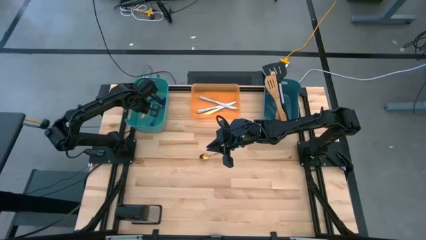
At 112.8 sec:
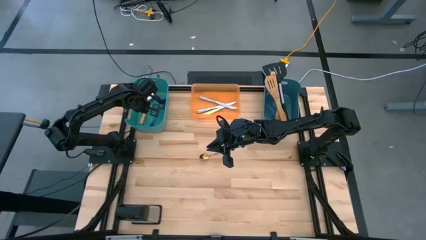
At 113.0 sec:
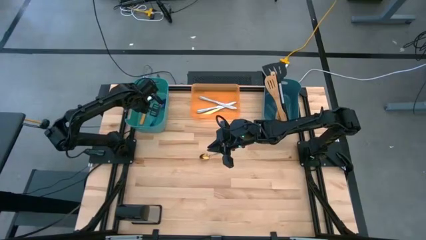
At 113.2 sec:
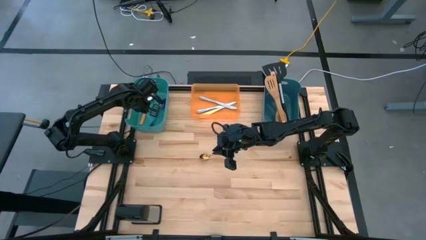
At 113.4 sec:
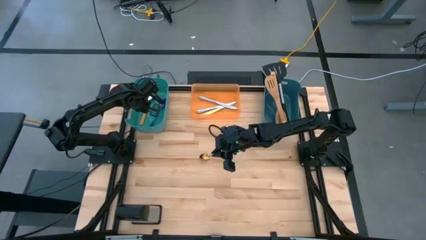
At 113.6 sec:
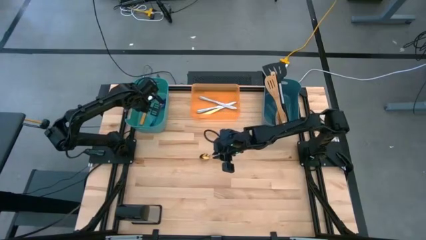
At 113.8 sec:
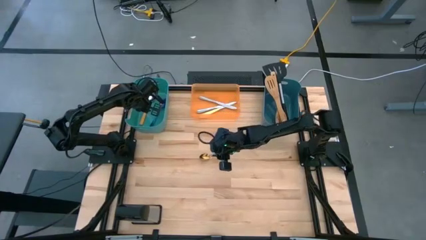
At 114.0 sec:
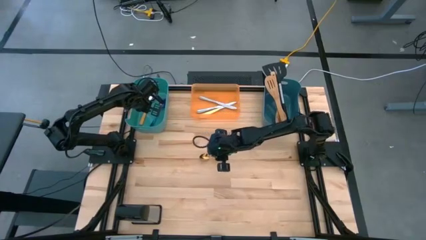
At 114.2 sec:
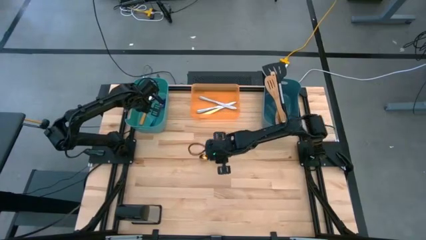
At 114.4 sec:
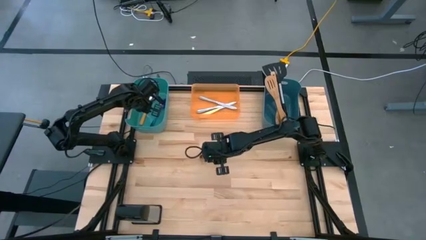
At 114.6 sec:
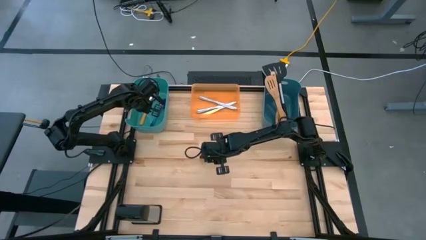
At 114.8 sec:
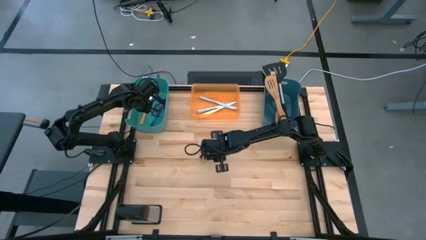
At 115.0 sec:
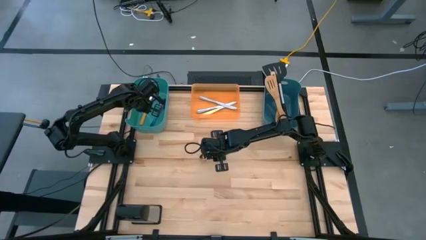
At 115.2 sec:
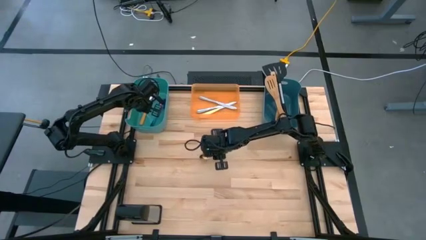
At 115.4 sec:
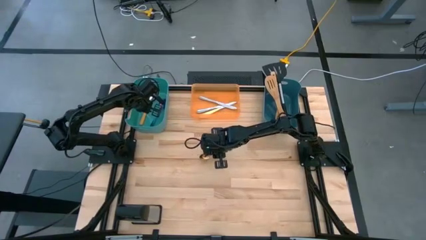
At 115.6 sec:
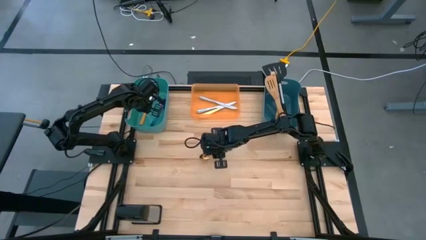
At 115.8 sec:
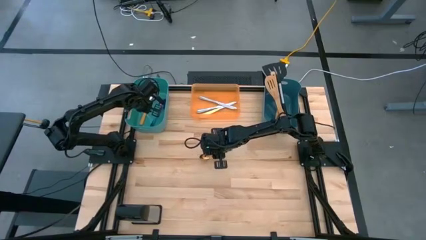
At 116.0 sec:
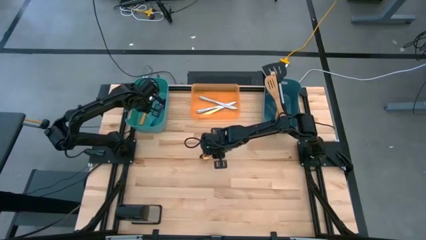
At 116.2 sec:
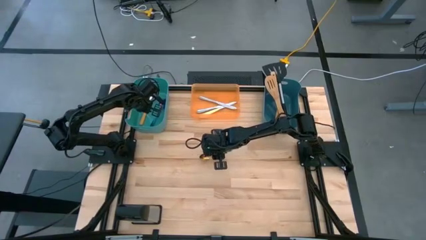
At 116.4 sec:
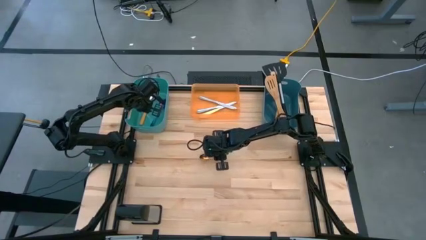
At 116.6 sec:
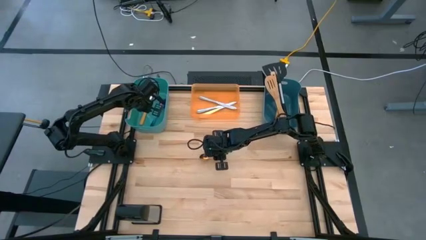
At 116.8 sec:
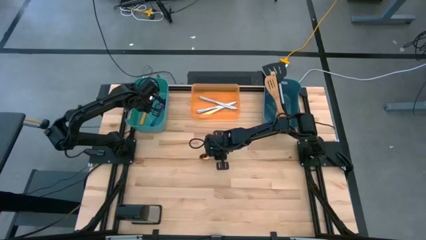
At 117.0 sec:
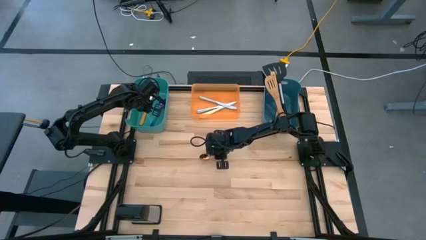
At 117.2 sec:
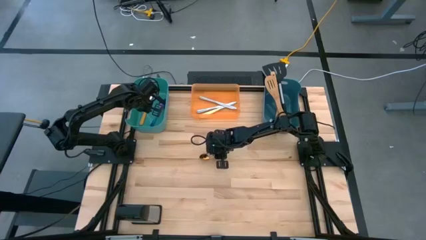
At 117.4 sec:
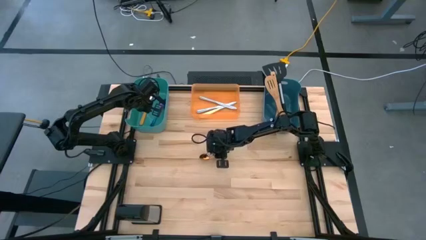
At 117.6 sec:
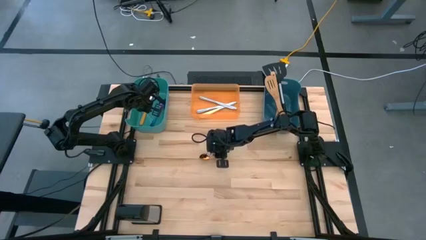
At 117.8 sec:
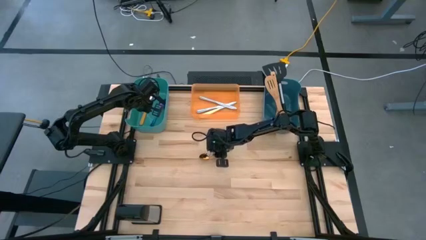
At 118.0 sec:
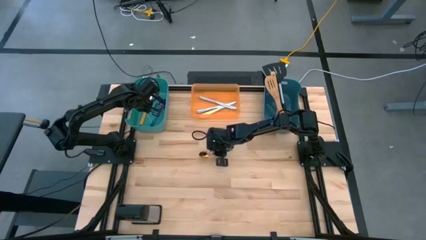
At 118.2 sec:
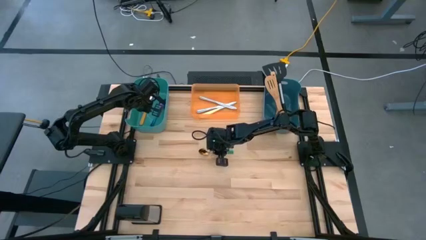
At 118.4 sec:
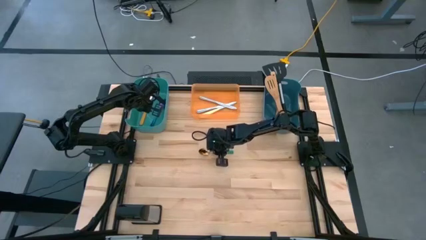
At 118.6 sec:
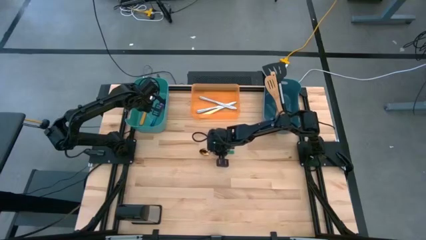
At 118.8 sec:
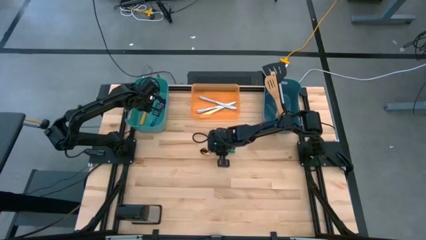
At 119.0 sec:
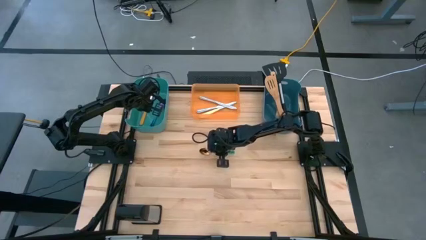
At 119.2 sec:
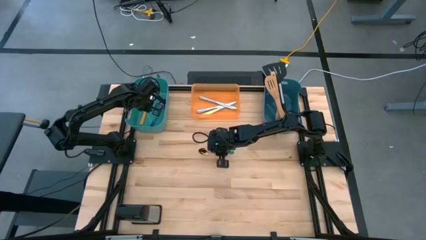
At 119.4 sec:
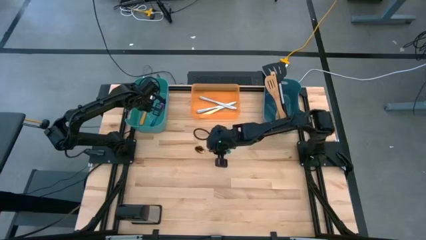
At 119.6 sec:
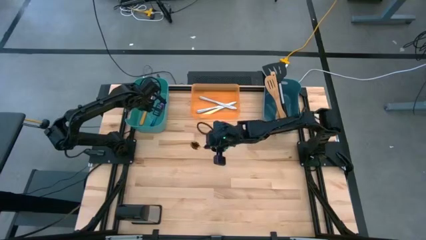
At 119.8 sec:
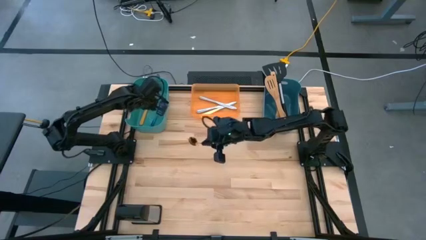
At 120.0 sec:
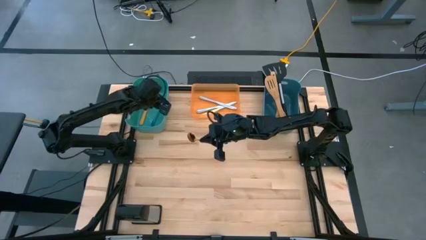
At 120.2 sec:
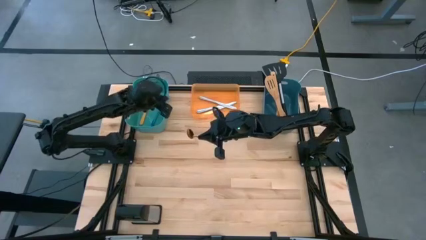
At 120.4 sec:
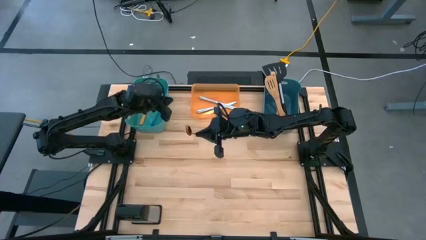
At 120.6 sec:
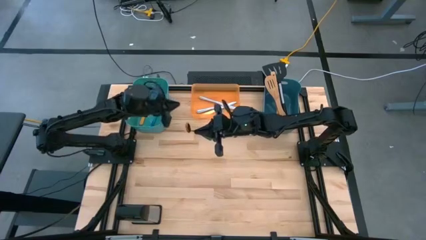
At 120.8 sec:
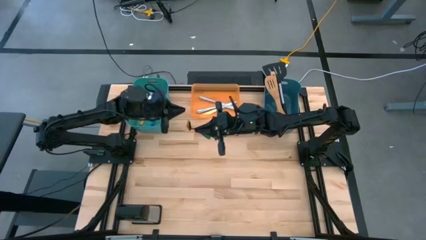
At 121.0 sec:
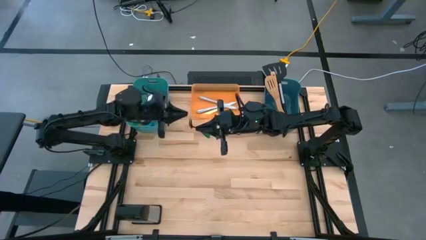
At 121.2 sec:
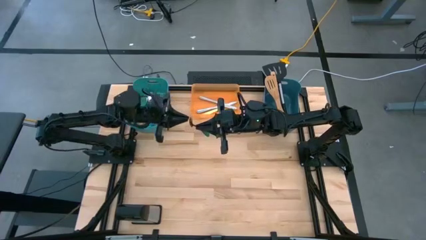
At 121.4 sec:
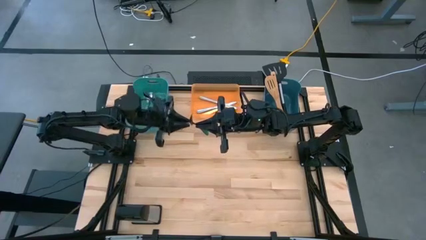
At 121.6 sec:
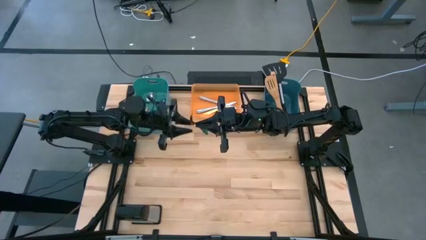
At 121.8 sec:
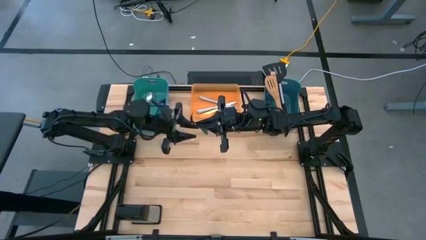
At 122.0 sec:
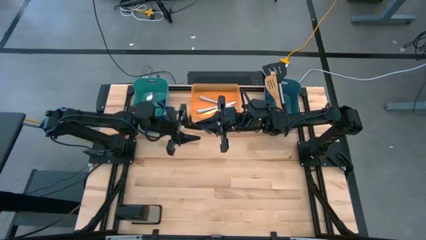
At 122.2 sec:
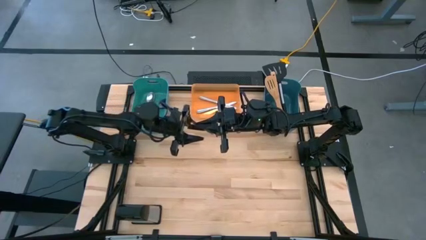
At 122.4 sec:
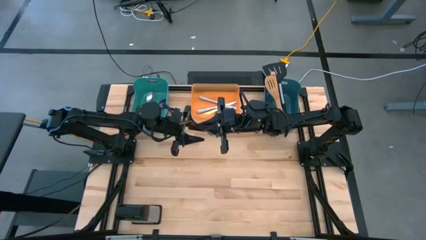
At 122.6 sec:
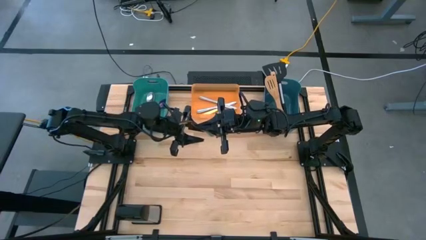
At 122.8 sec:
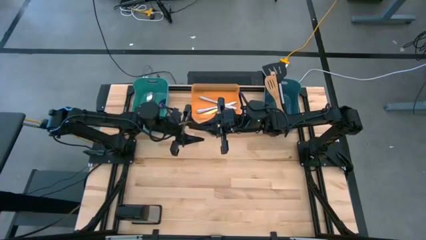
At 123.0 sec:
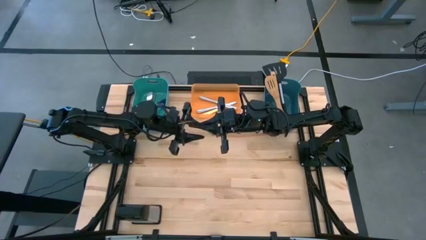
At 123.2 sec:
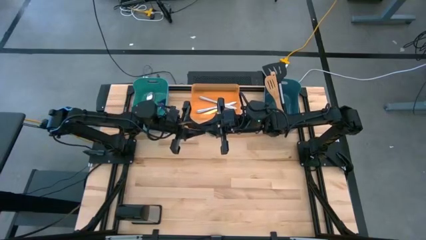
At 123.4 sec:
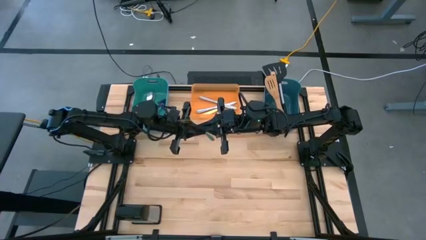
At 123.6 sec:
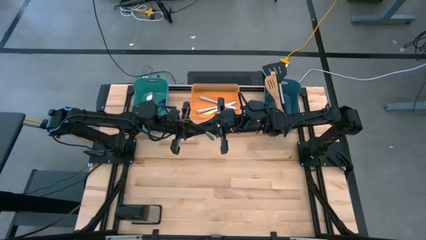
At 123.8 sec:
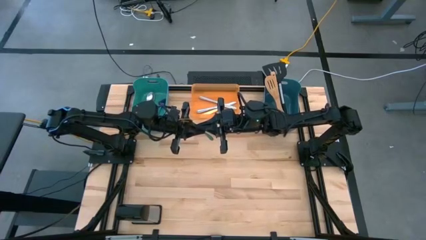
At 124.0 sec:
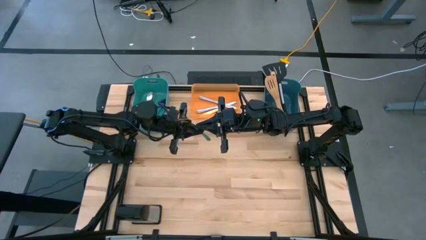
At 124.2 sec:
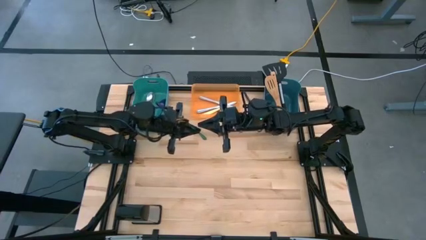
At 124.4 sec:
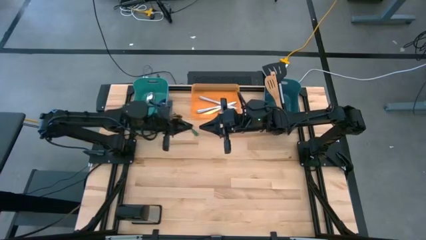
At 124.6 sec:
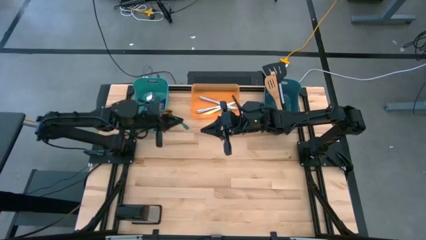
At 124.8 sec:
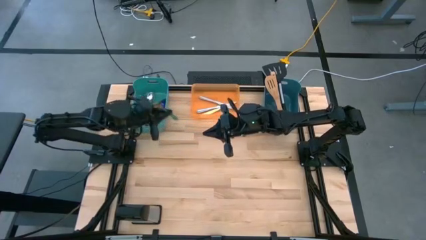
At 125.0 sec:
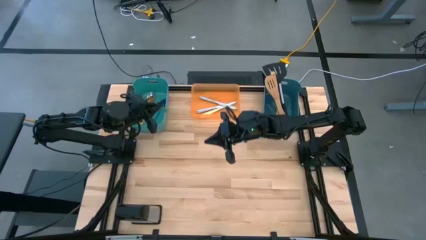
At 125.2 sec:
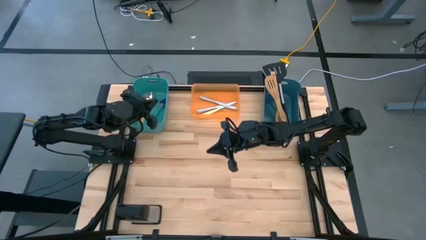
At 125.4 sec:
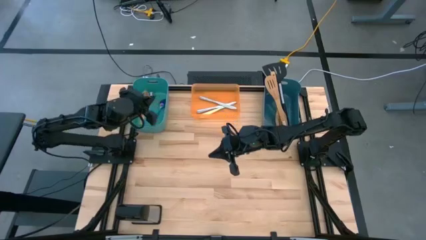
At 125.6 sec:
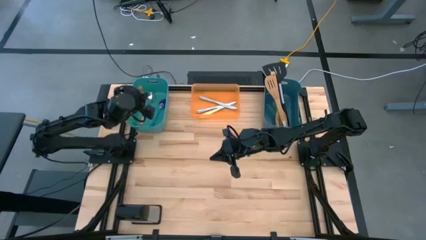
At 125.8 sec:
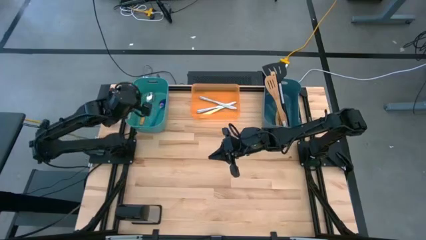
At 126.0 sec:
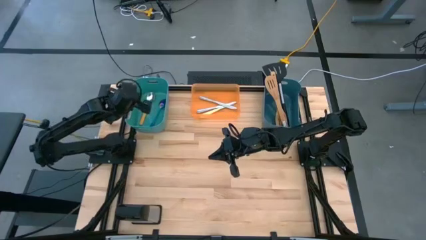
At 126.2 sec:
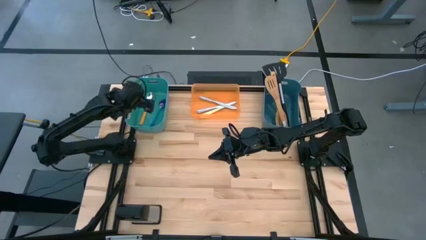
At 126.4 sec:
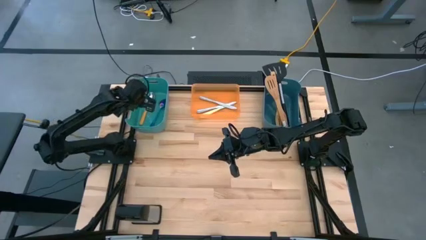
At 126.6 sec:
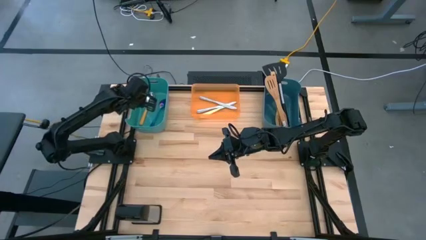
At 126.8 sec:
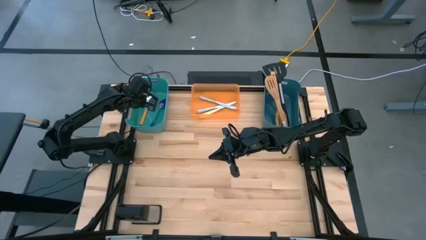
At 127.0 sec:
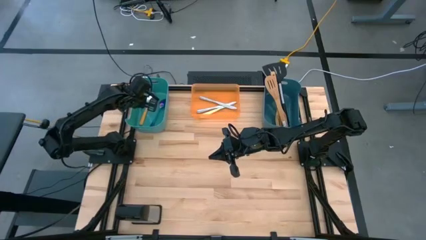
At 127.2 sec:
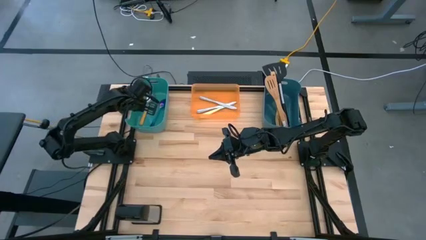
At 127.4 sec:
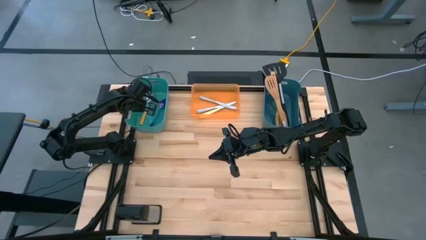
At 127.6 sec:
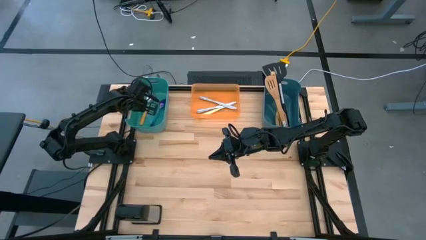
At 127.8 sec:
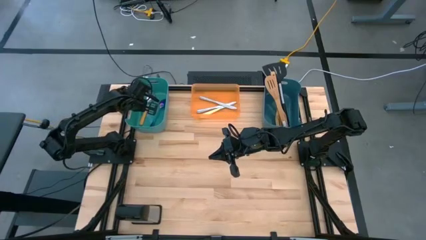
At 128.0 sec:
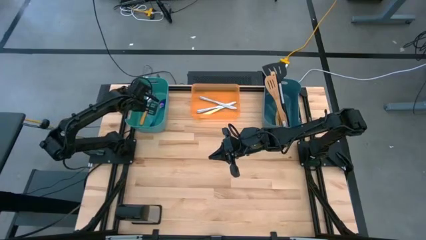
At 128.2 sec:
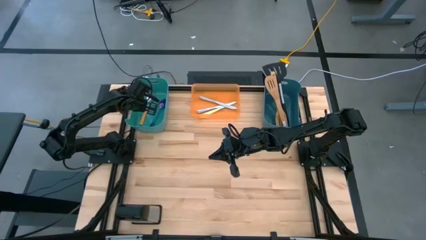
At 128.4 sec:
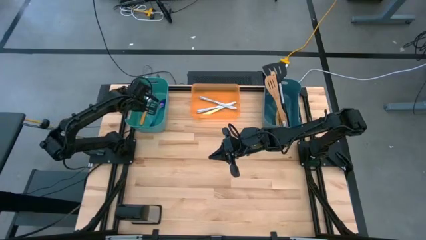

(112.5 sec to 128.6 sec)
Task: Pick & Place Kitchen Items
Put the green spoon into the green bin
